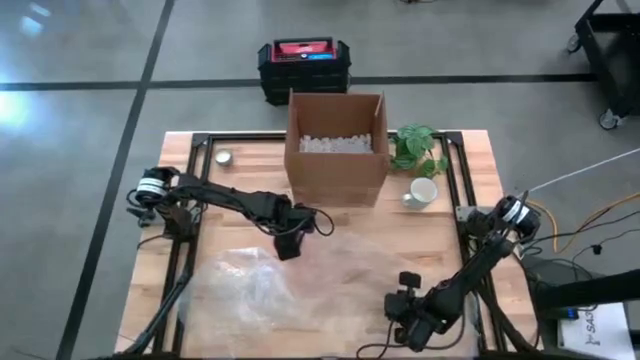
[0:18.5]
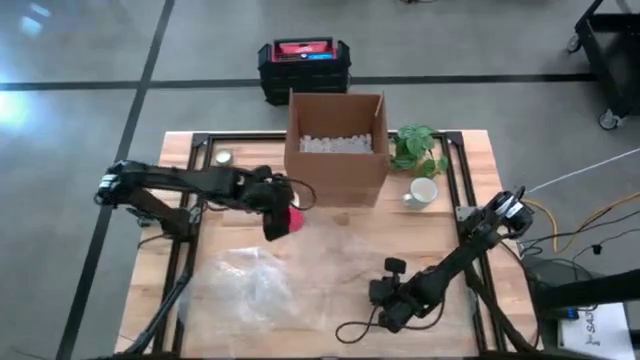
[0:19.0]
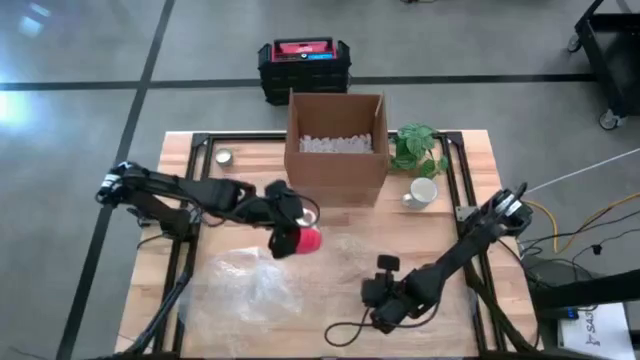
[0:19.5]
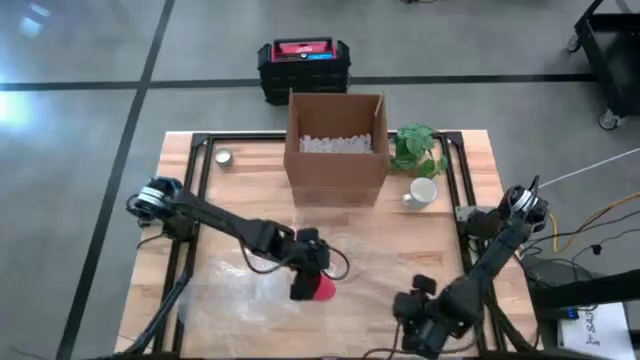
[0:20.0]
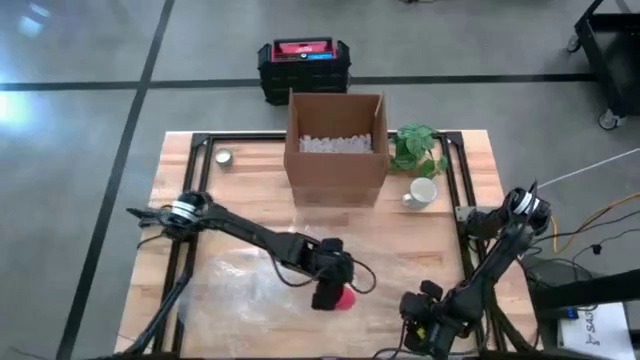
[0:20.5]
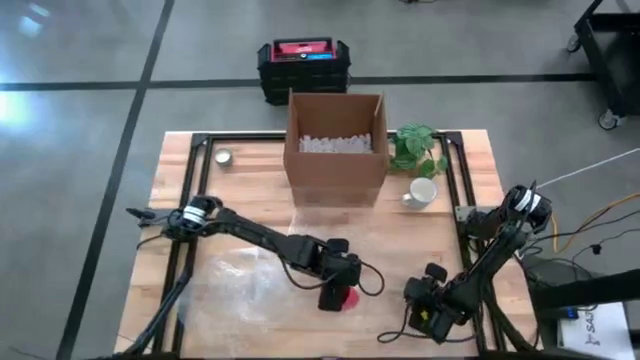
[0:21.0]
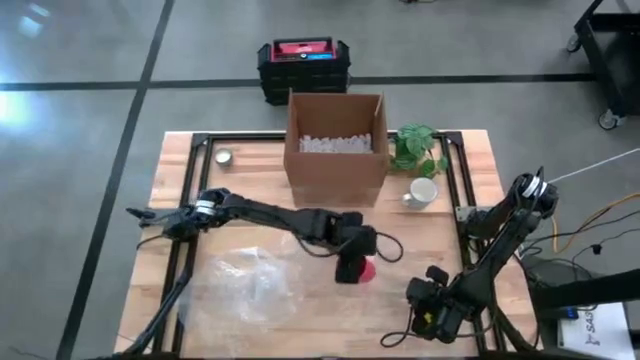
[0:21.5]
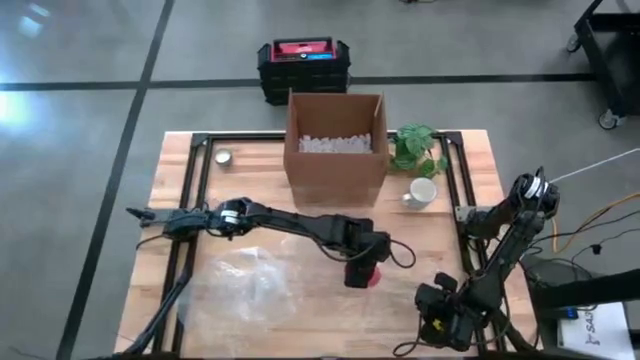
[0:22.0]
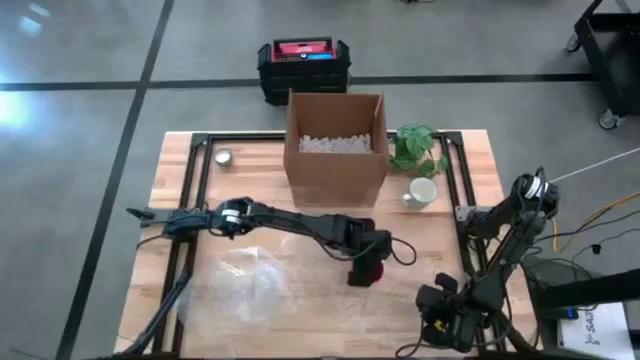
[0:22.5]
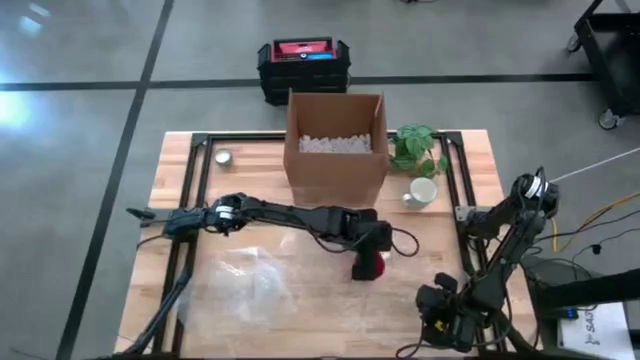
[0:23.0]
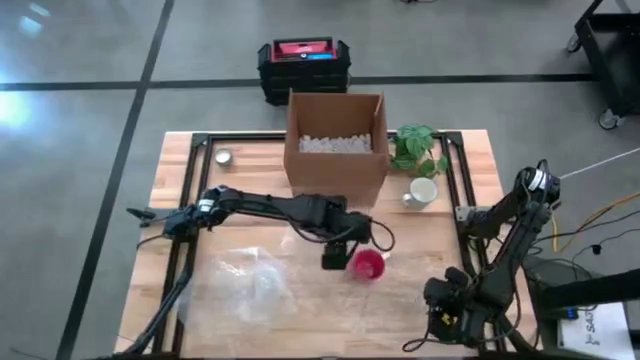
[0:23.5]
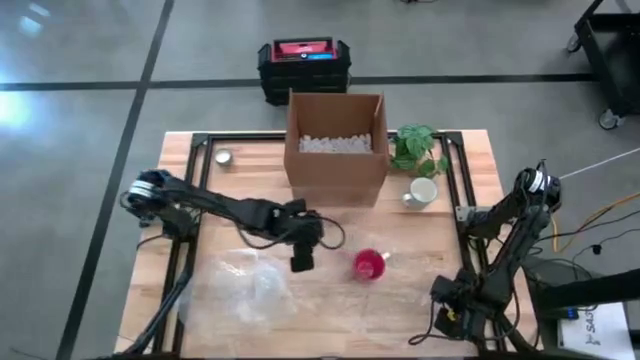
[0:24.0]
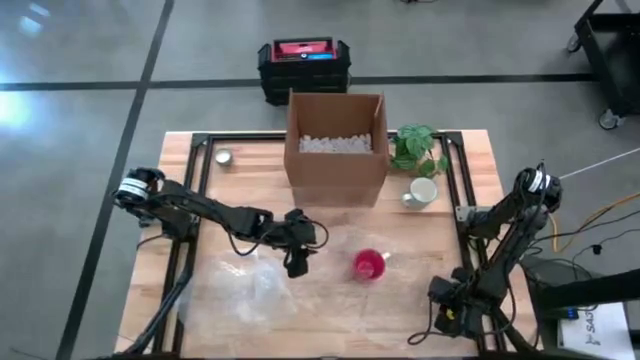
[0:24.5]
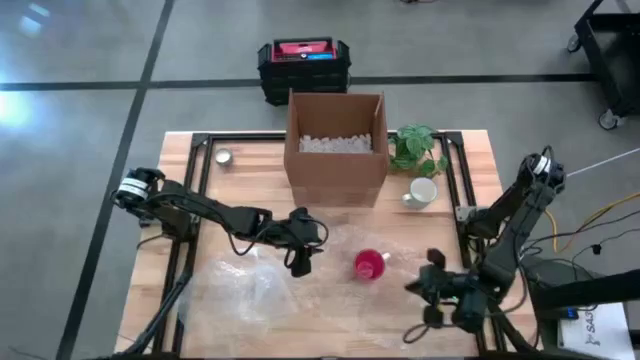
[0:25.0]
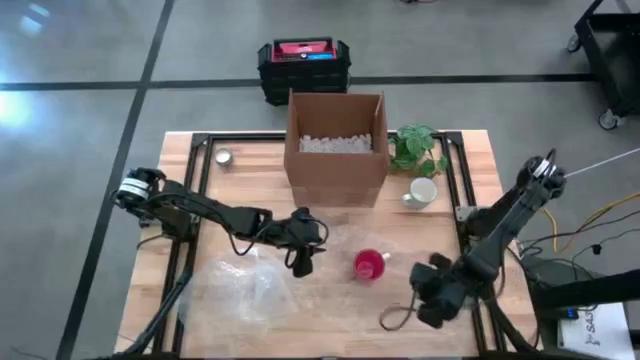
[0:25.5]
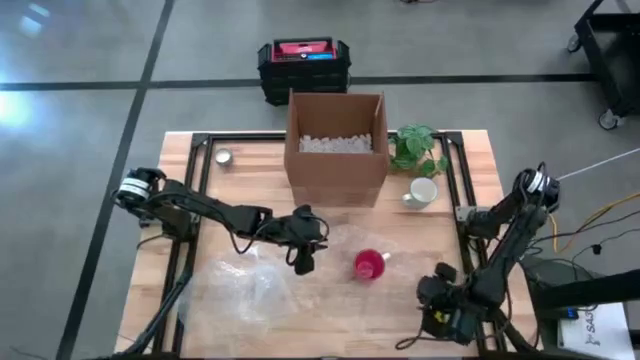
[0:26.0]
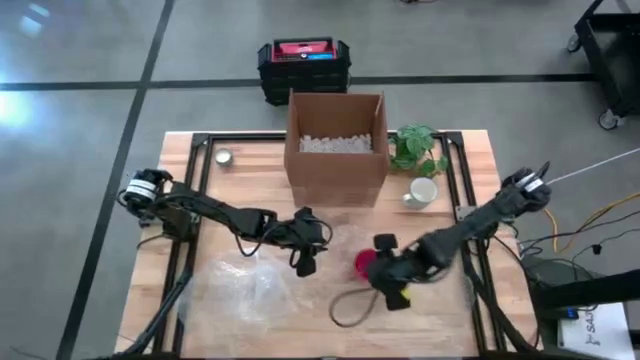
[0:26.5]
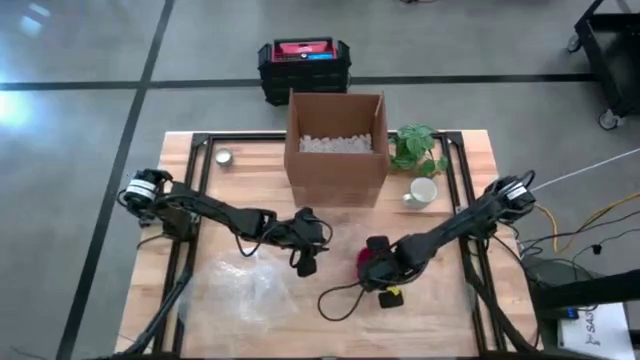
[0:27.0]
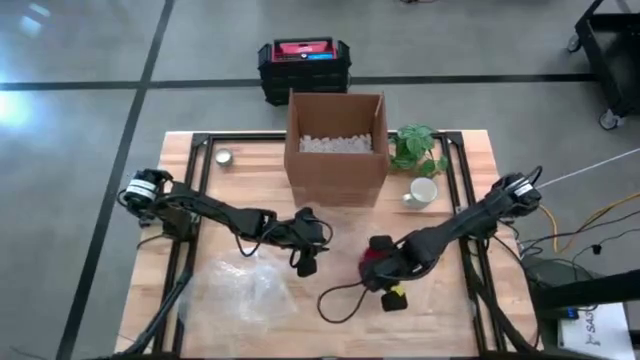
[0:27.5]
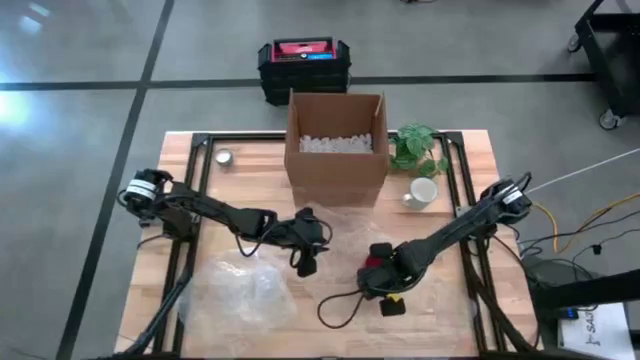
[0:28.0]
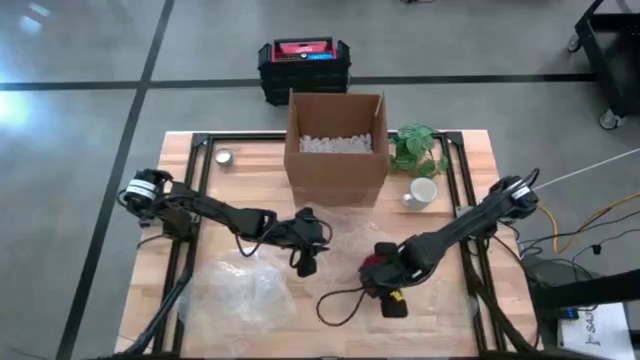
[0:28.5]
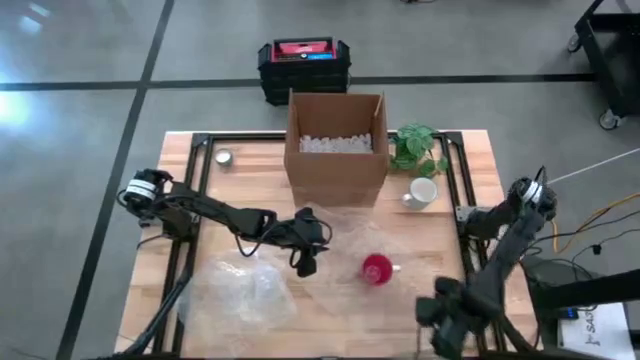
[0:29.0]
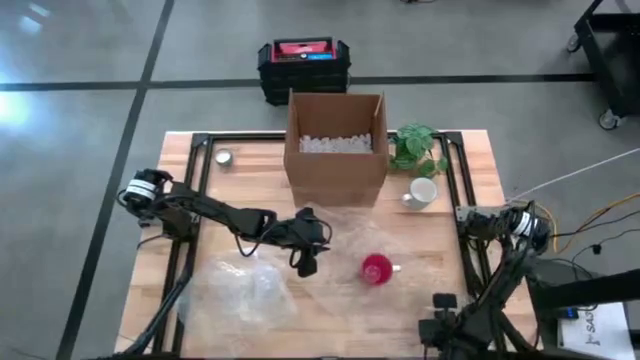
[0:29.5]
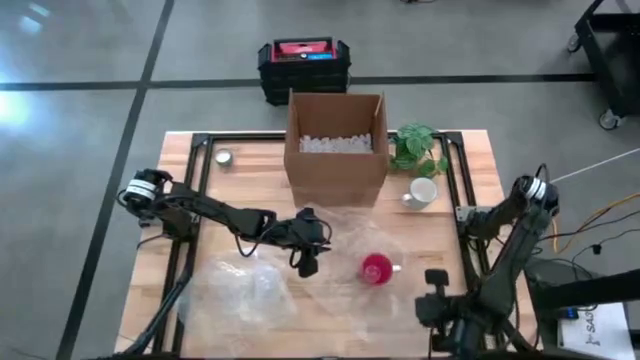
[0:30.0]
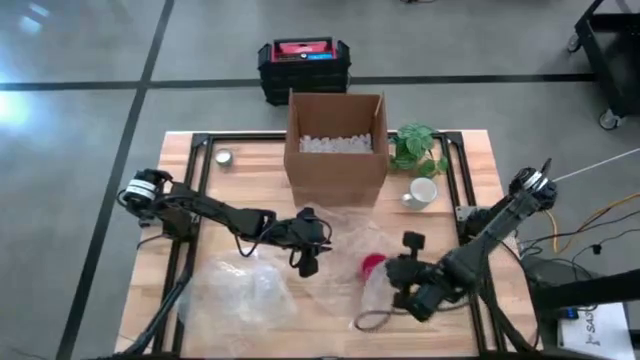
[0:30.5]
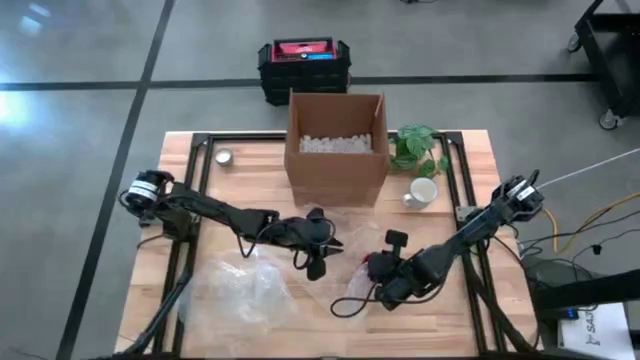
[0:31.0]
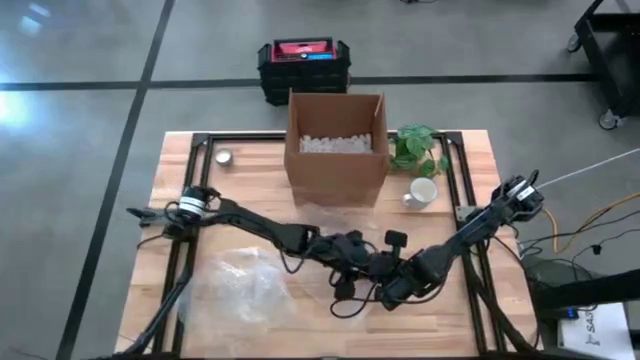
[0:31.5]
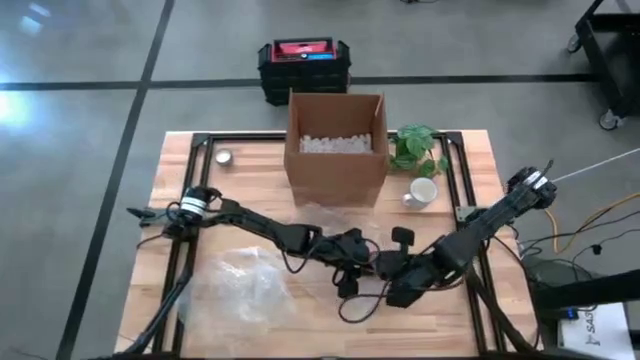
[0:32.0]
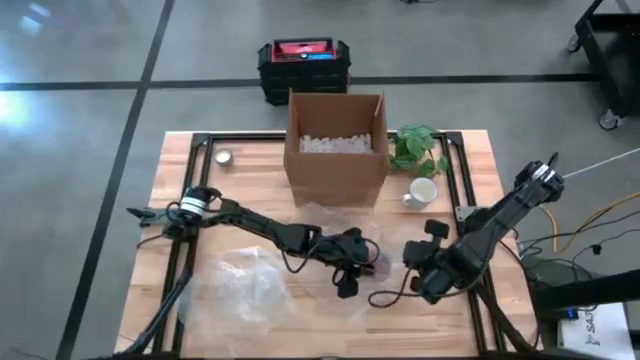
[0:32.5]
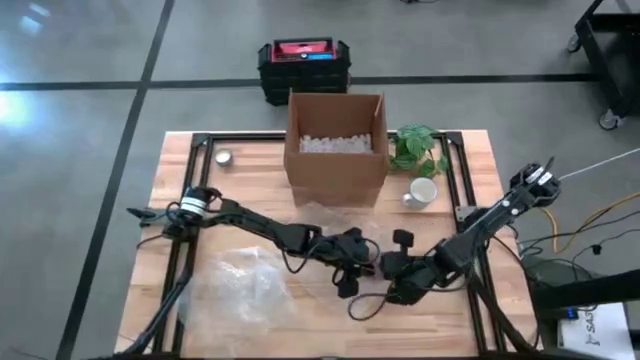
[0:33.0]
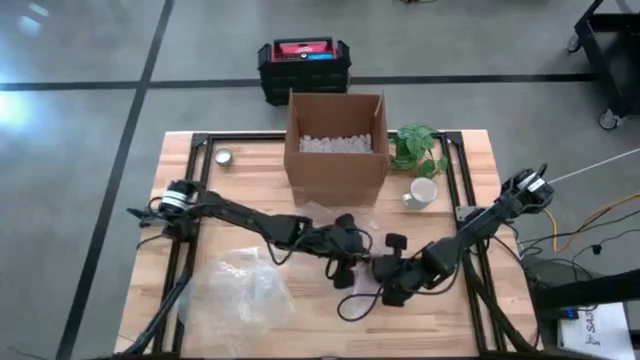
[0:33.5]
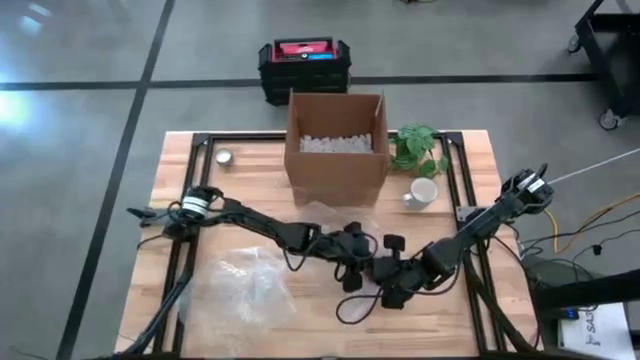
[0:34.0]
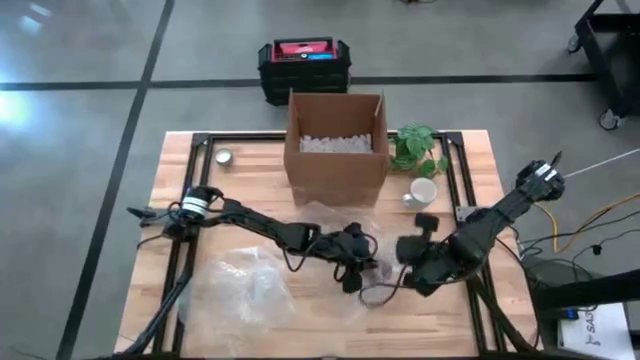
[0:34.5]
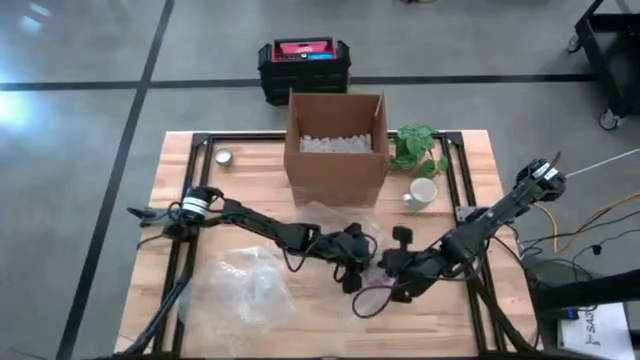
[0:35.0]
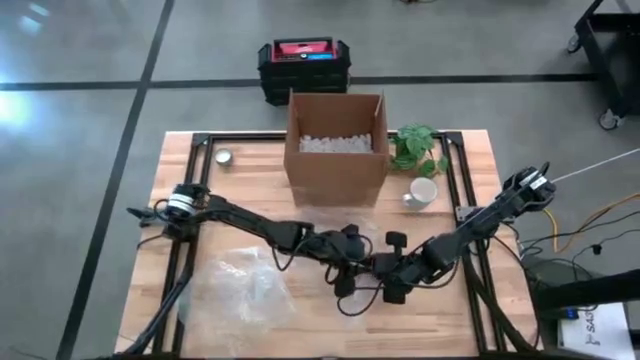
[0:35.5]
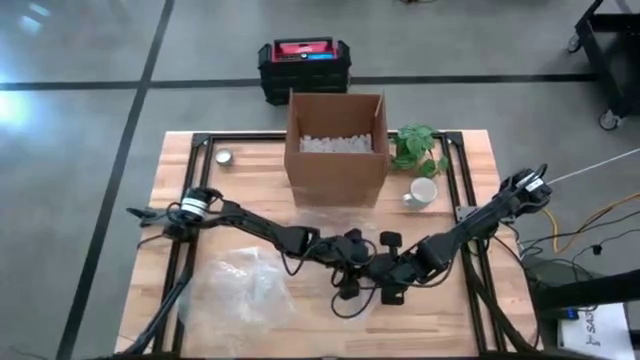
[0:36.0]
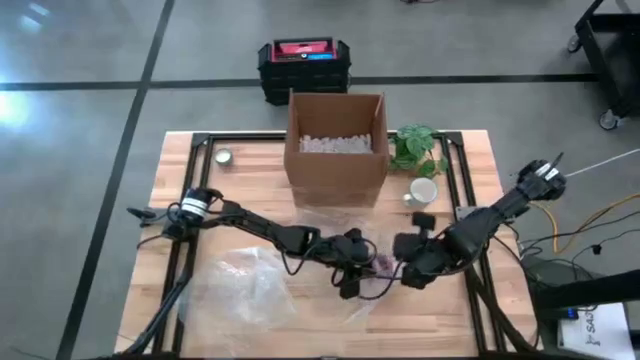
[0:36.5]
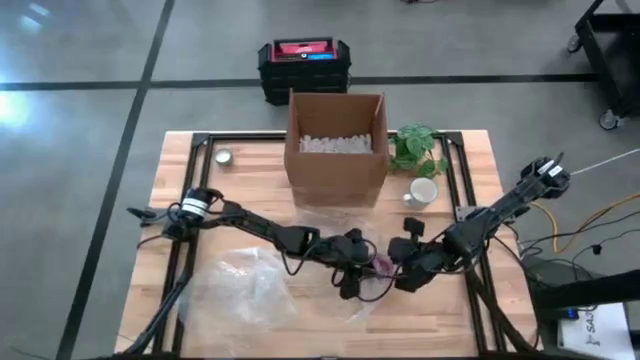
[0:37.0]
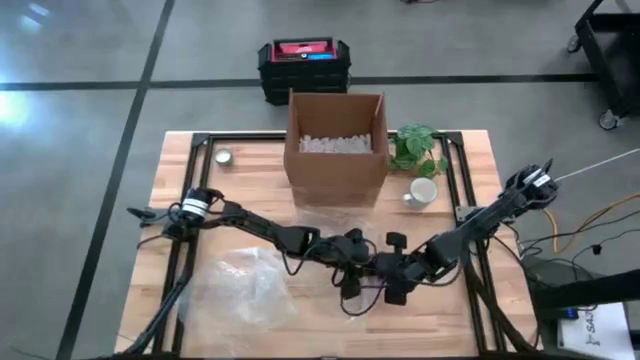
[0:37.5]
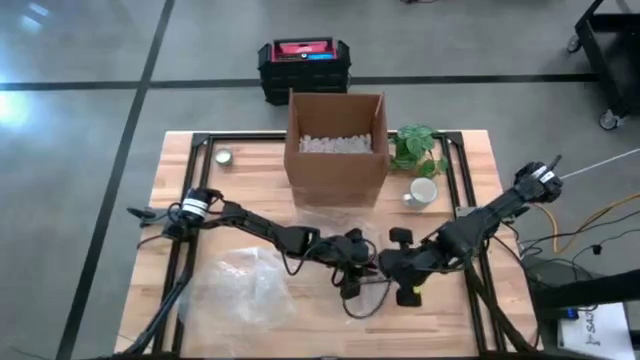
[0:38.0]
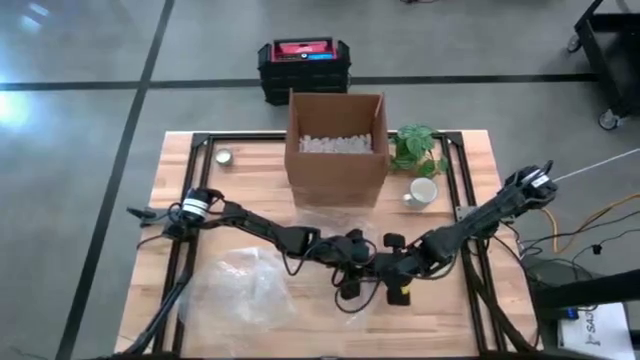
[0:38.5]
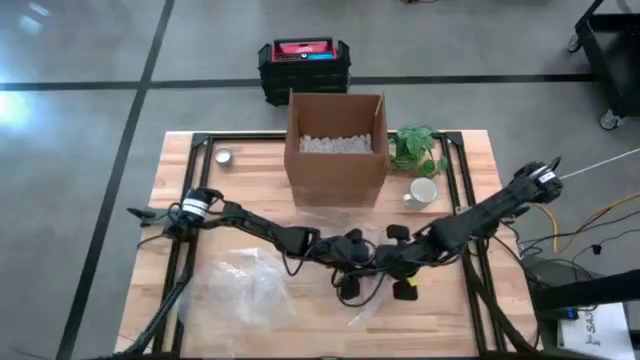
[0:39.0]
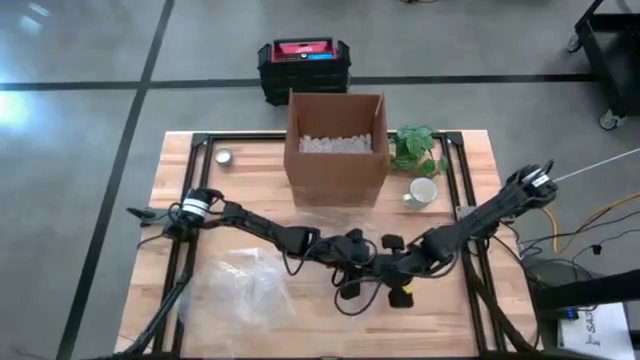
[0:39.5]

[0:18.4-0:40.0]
Task: wrap mug
Wrap the orange mug with the right transparent bubble wrap
